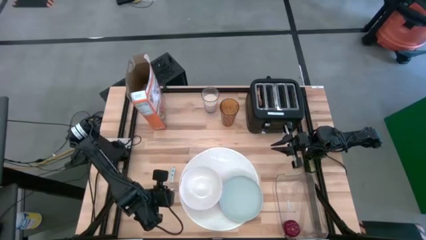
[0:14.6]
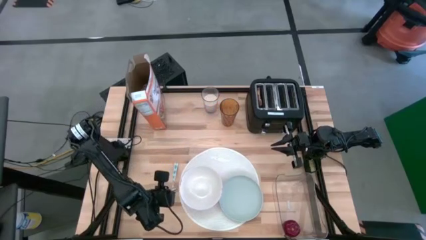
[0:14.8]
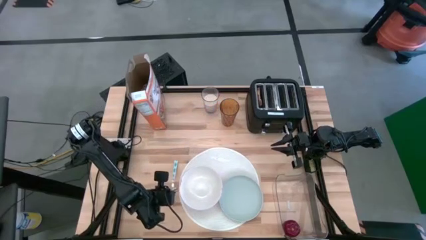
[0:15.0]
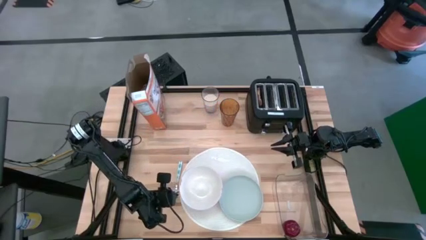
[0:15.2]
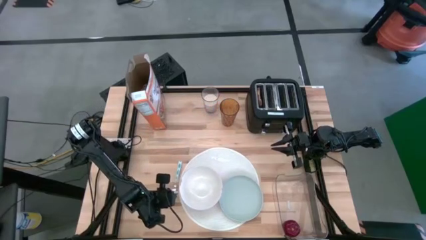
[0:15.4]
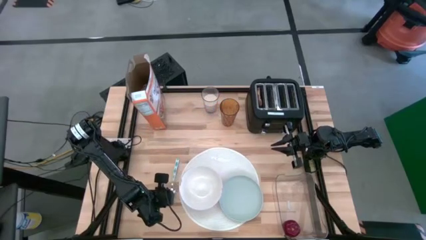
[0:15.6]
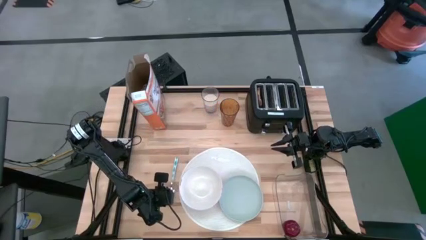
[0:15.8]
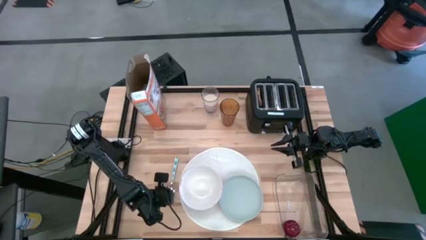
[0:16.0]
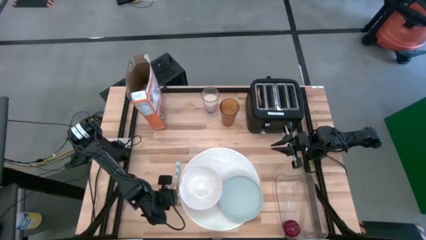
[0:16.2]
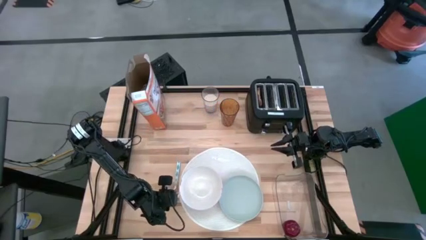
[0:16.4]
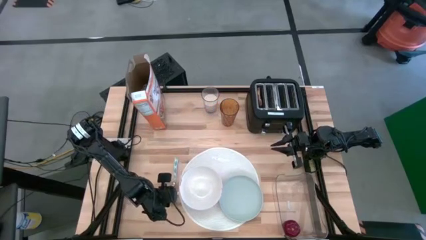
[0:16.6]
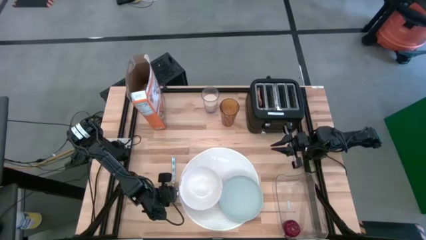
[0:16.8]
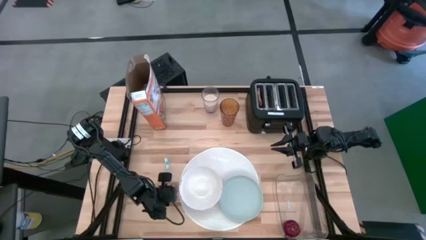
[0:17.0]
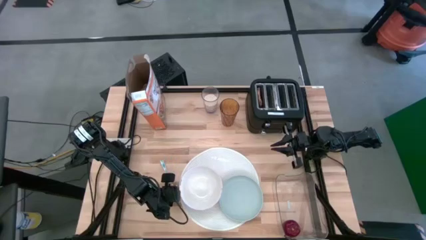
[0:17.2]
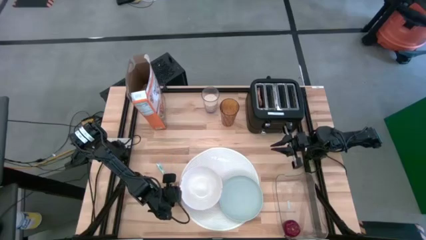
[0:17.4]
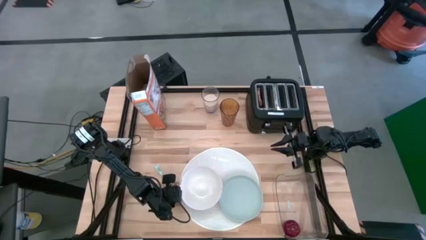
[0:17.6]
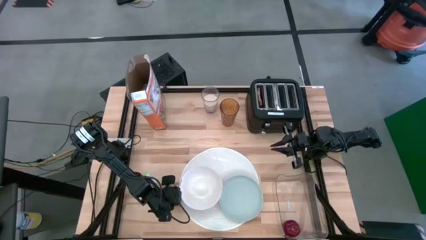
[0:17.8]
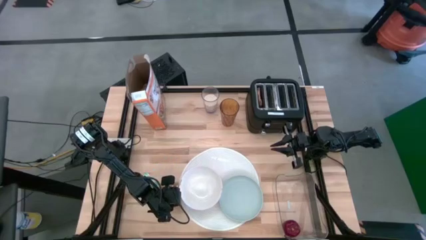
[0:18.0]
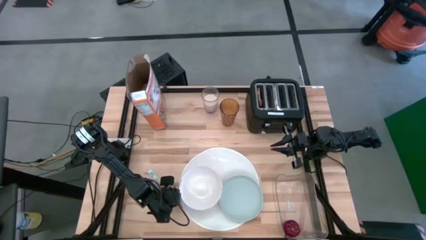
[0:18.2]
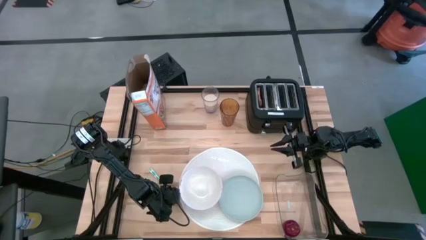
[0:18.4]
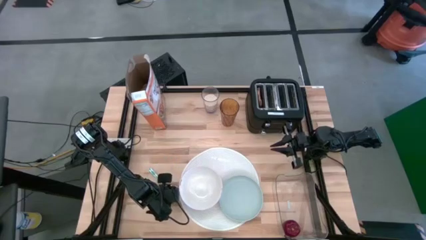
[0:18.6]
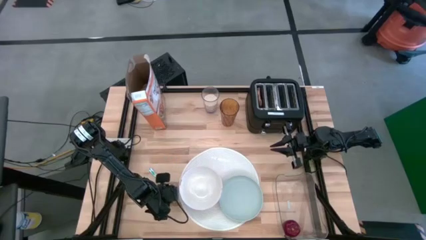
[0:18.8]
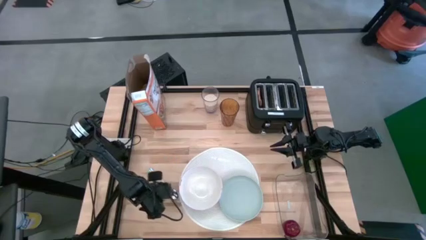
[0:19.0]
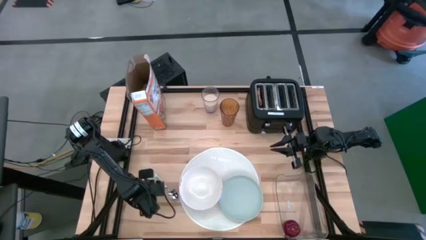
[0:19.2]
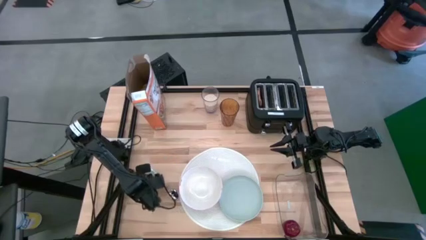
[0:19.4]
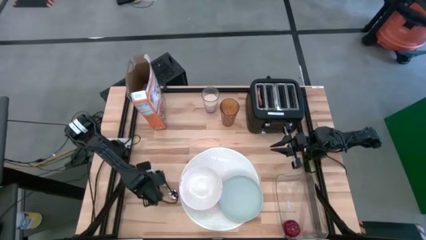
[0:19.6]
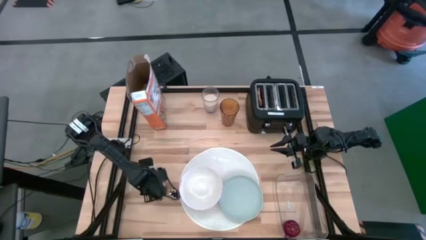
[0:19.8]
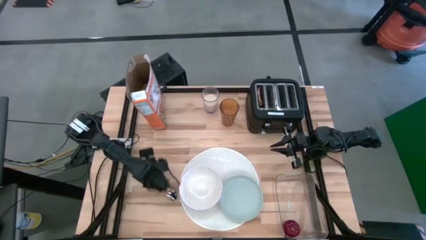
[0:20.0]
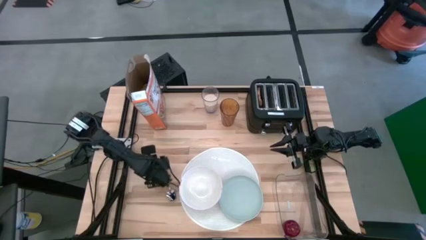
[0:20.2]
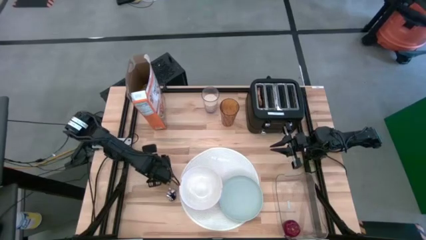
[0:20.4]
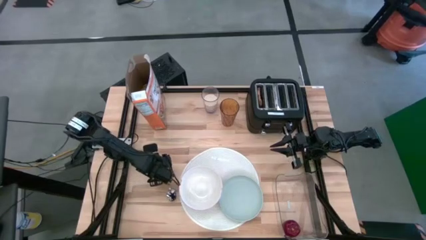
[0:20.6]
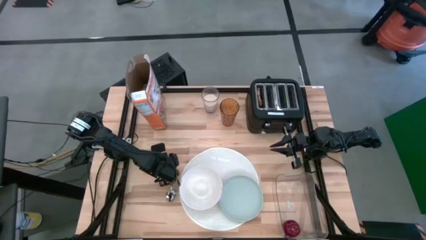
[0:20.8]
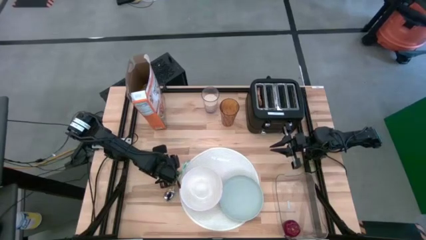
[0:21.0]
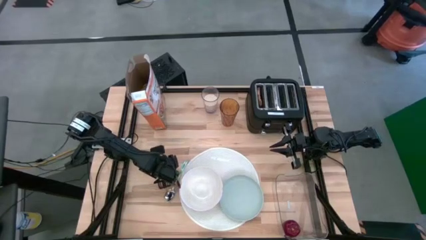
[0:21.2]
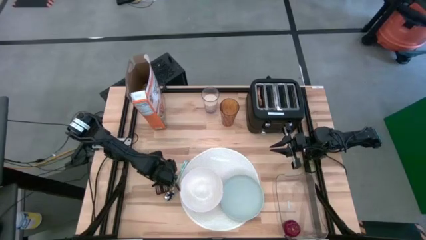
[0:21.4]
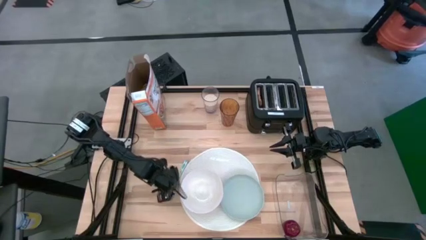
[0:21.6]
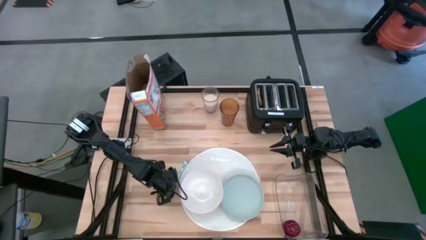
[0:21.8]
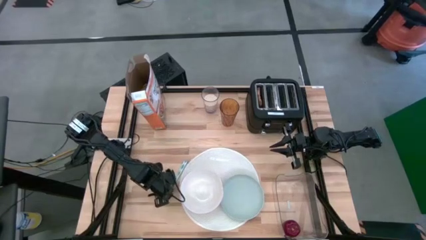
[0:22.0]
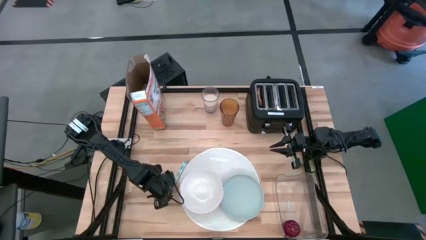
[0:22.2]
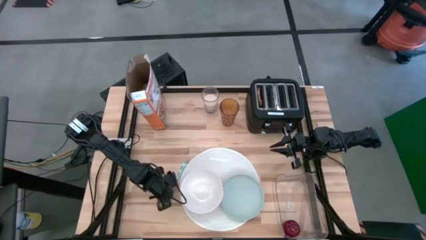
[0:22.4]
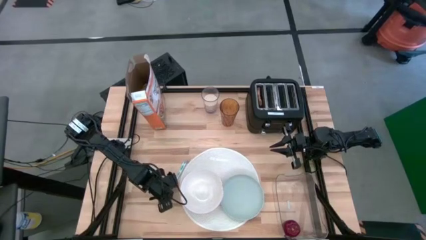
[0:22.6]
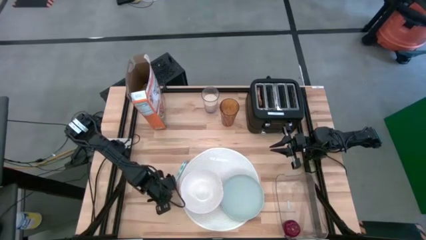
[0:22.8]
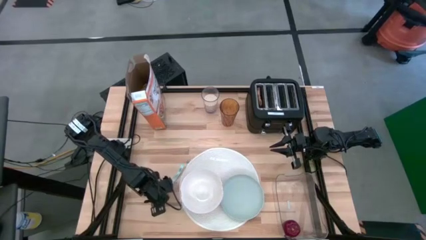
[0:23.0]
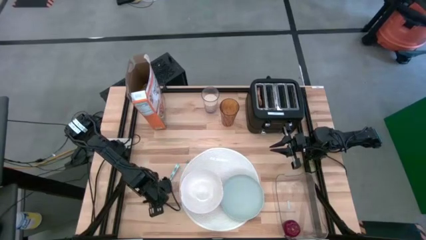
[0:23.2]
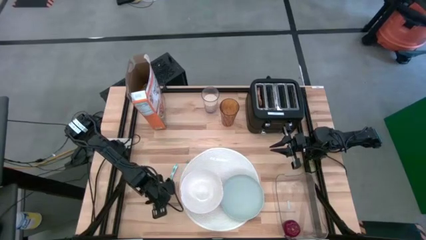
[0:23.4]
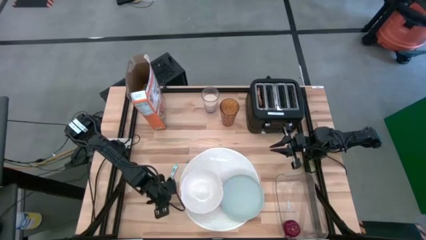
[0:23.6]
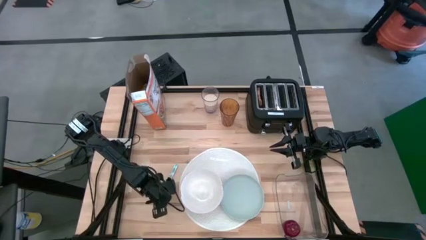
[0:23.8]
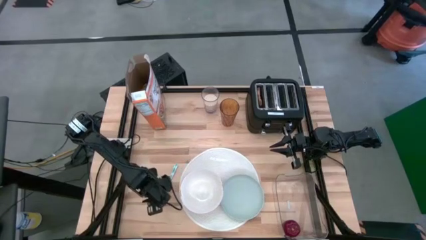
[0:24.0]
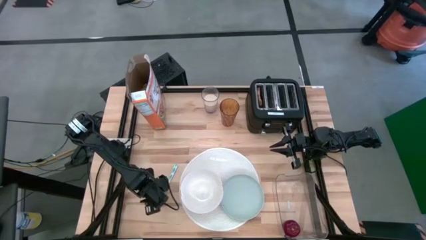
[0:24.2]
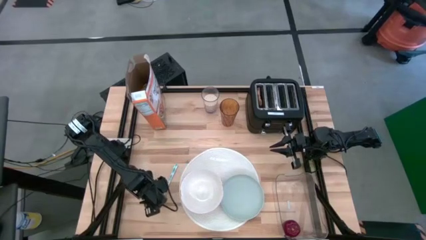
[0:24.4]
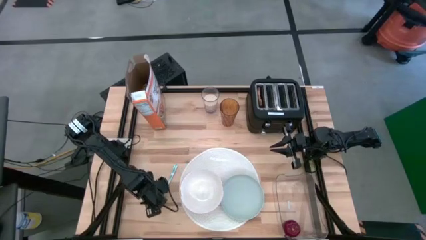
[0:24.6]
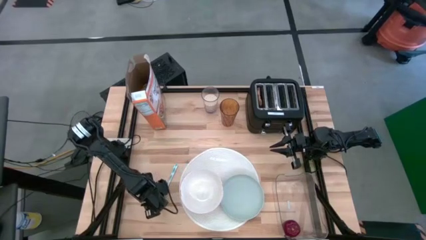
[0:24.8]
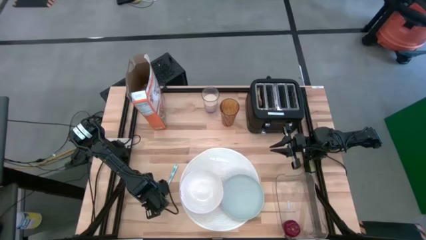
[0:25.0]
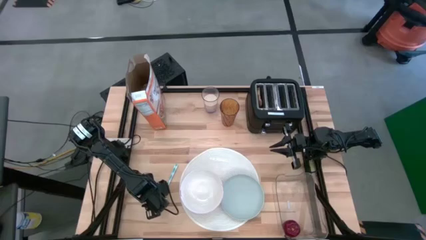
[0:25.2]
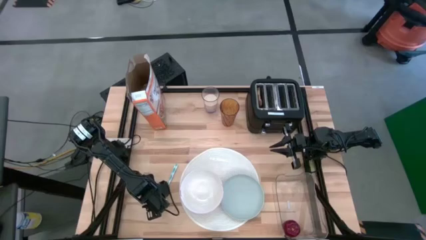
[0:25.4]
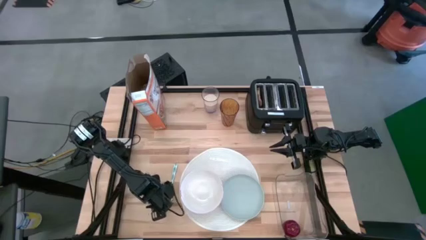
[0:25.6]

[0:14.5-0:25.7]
Task: Arrange a breakfast setting
Move the spoon to the left side of the white table mat

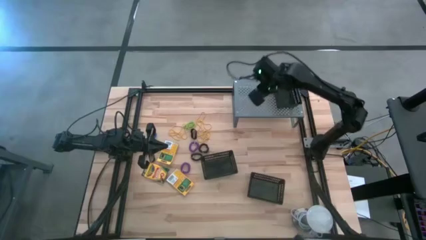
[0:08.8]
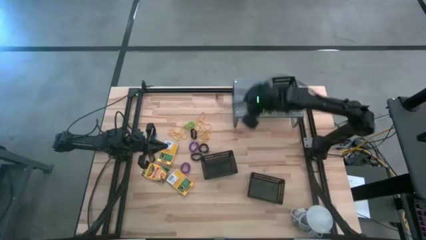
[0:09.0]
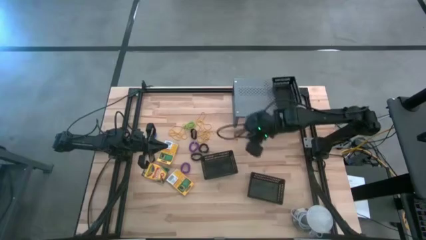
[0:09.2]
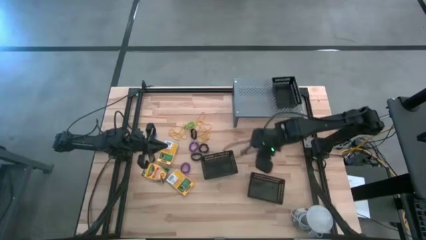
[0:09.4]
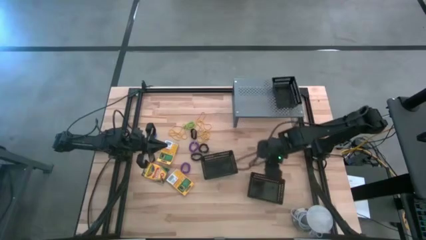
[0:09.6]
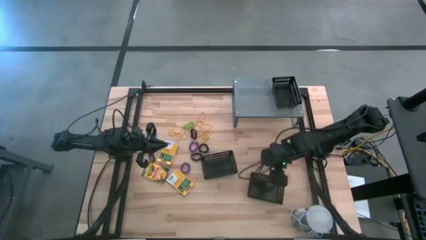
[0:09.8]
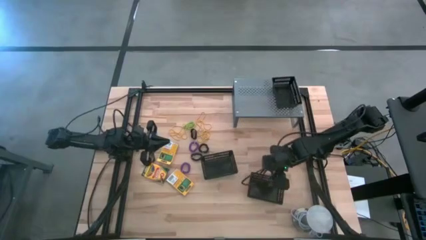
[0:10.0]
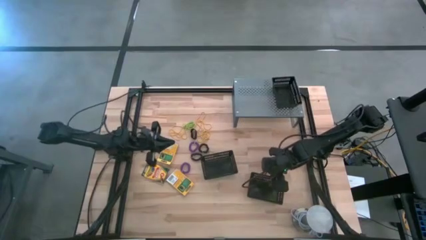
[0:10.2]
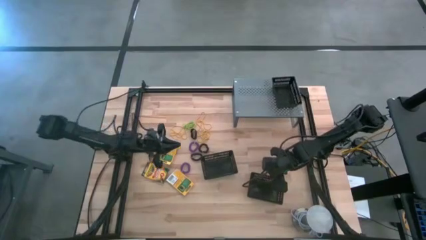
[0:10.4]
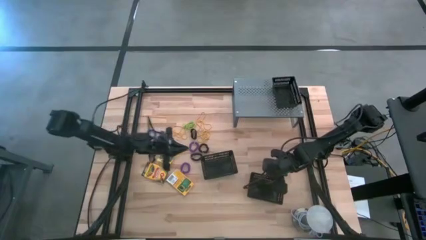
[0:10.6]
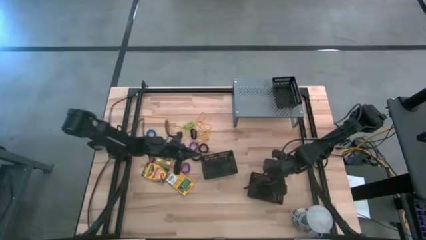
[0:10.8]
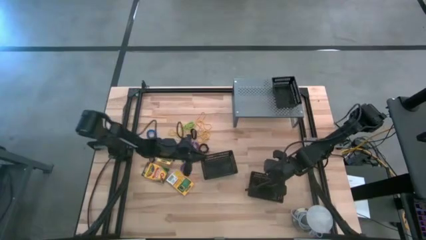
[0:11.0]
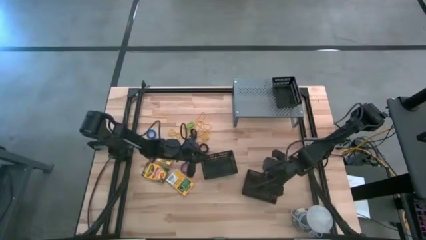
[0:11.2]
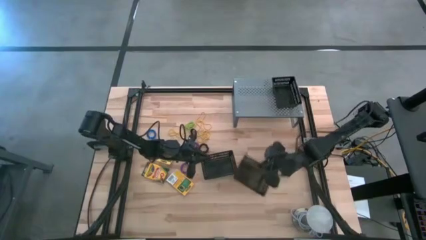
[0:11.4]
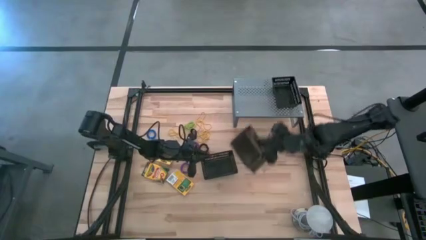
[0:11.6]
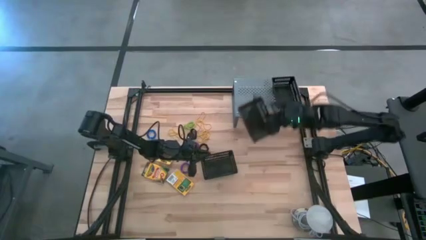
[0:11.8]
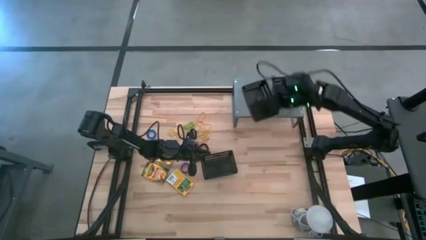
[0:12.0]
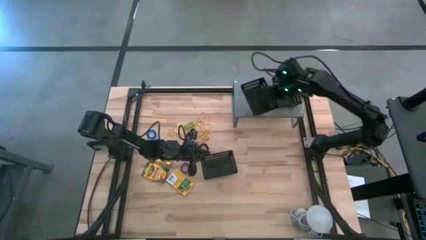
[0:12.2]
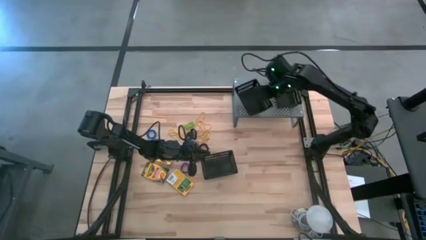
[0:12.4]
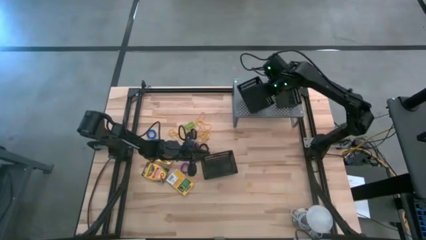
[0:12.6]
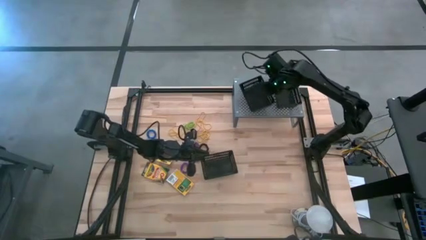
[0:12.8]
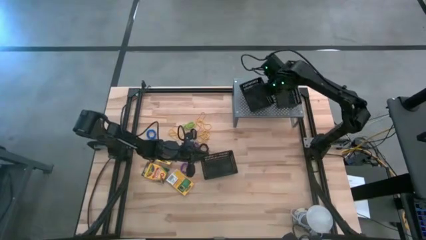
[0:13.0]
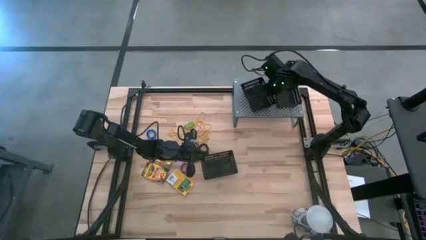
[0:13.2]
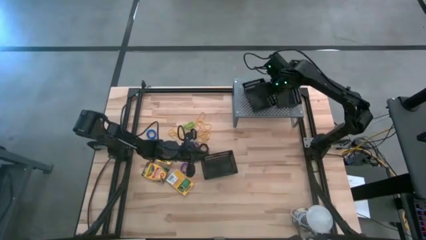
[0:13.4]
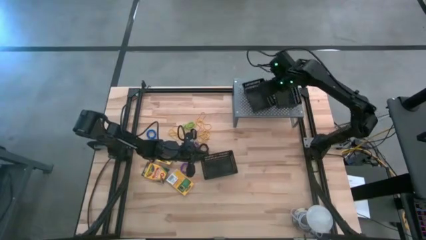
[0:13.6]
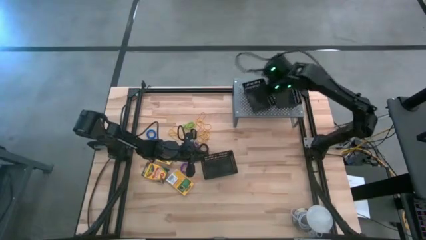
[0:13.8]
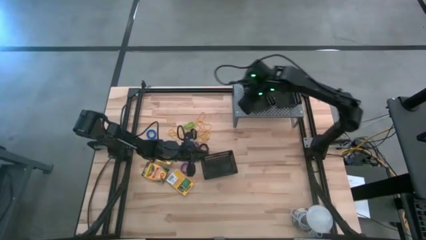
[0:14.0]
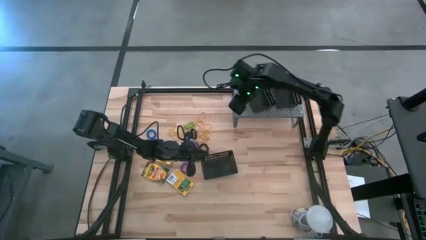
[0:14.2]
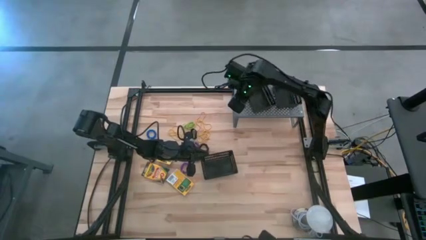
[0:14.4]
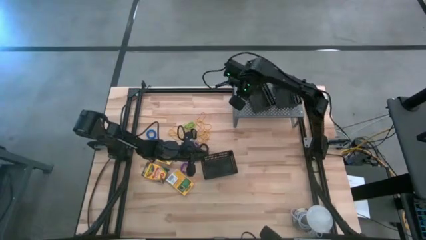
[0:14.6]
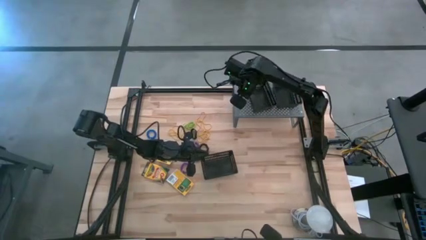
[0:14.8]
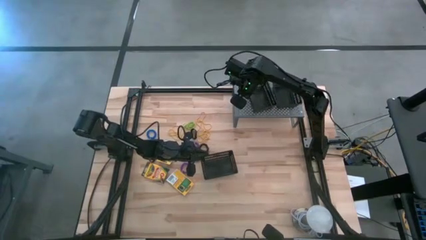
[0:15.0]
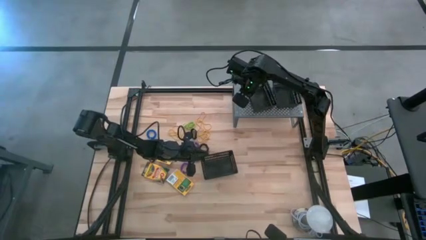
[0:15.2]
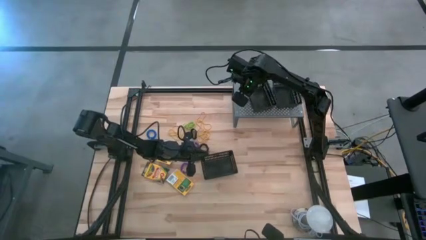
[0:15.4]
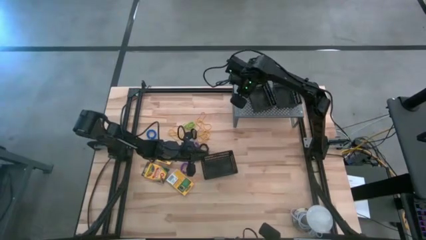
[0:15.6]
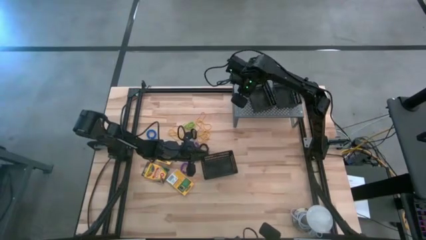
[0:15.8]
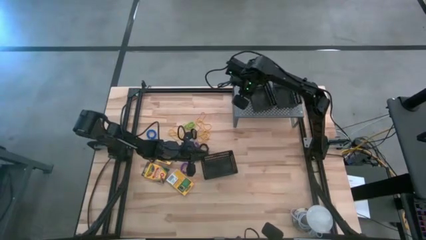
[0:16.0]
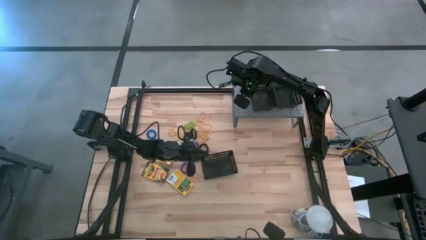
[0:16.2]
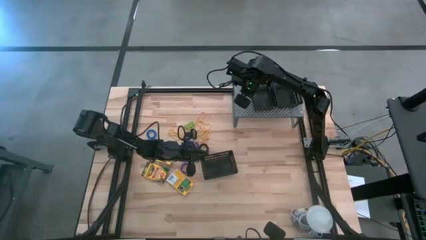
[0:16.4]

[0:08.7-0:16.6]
Task: Pick & Place Office Desk Supplies
Put the bottom black basket on the shelf
